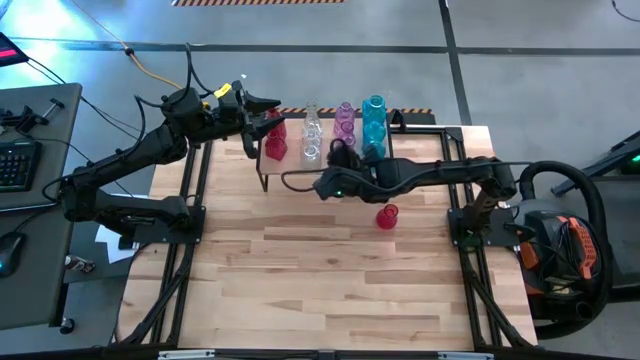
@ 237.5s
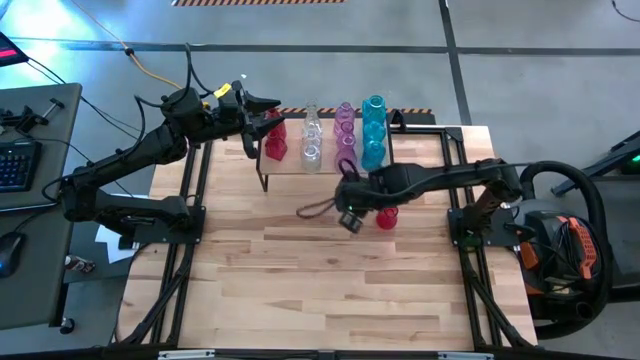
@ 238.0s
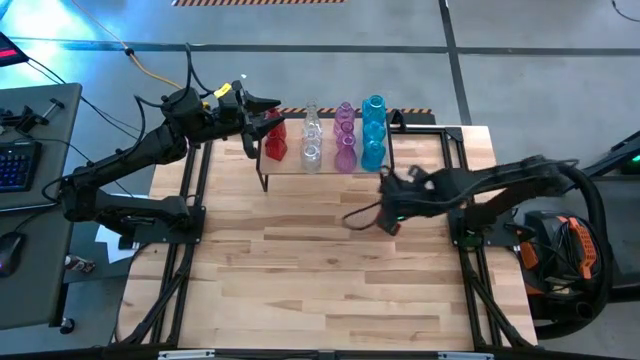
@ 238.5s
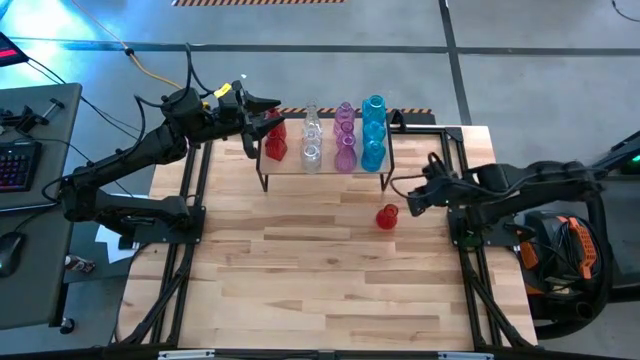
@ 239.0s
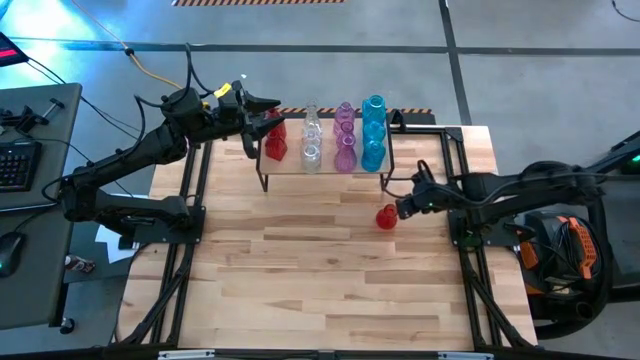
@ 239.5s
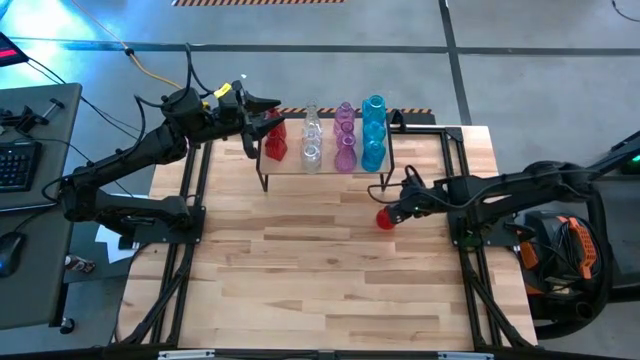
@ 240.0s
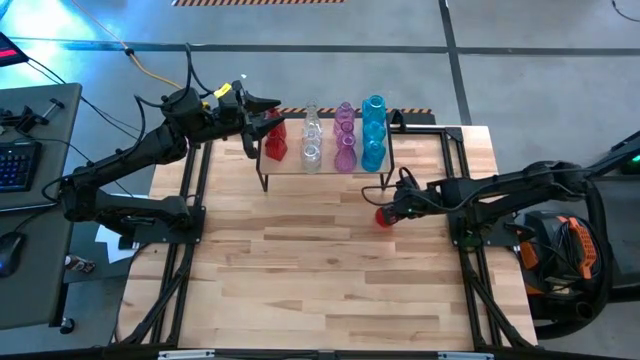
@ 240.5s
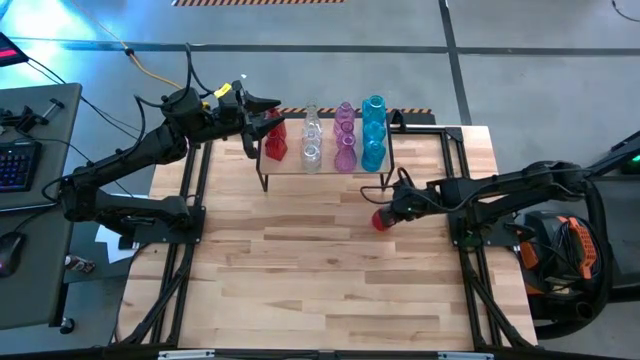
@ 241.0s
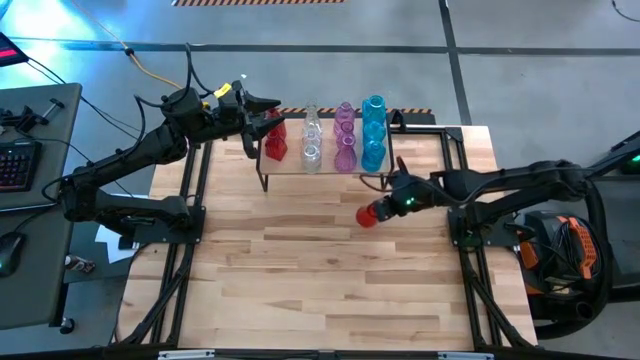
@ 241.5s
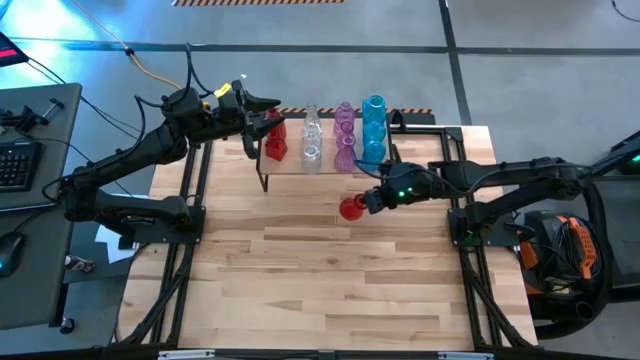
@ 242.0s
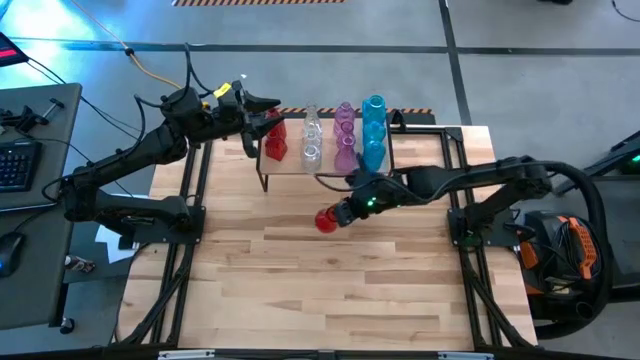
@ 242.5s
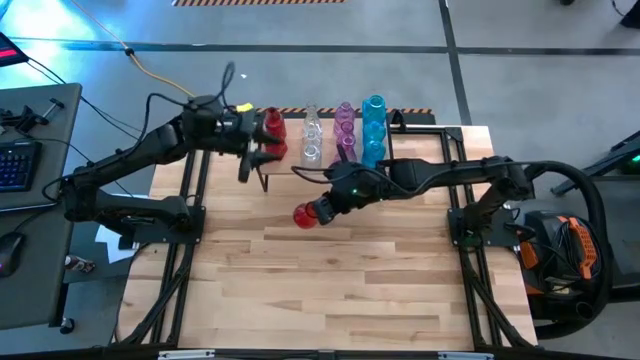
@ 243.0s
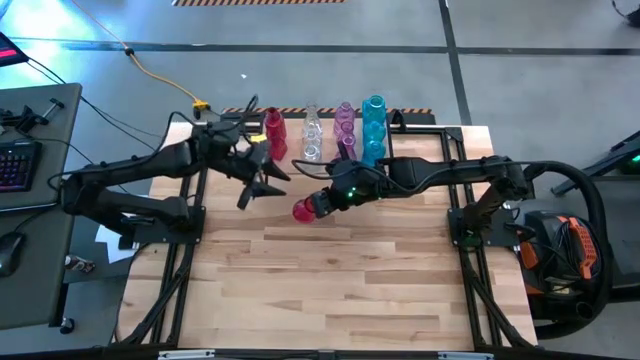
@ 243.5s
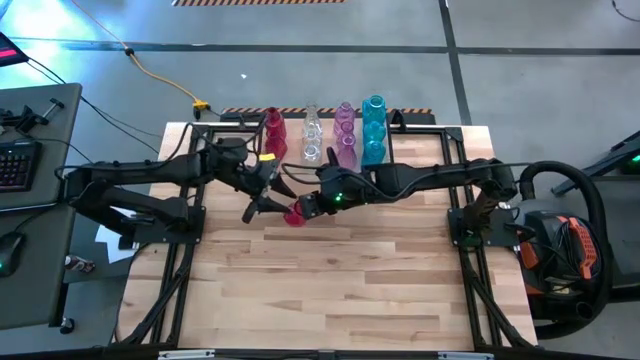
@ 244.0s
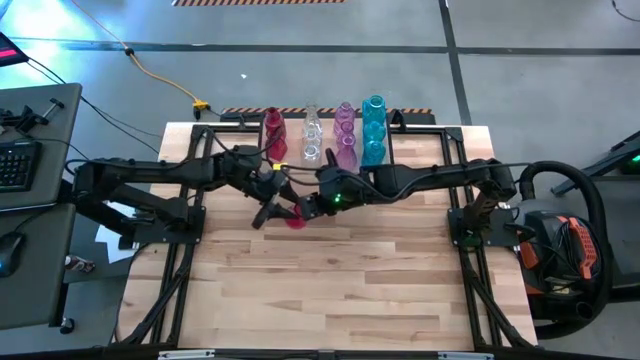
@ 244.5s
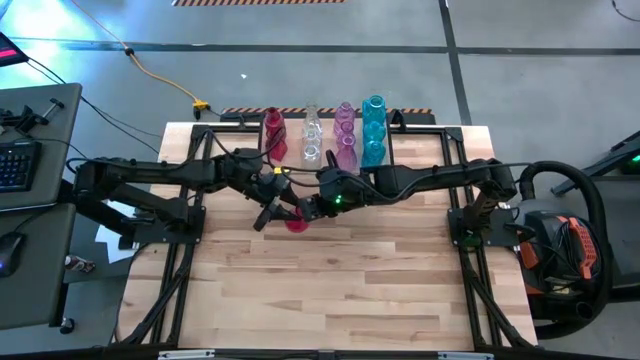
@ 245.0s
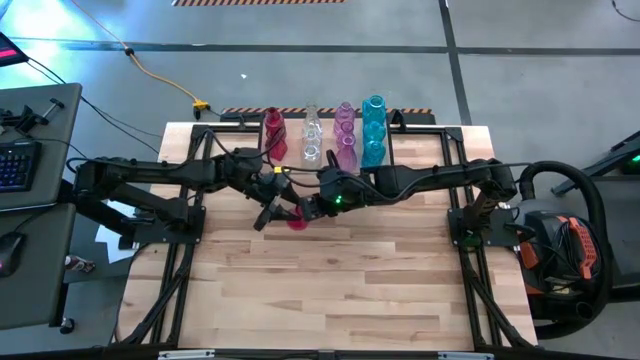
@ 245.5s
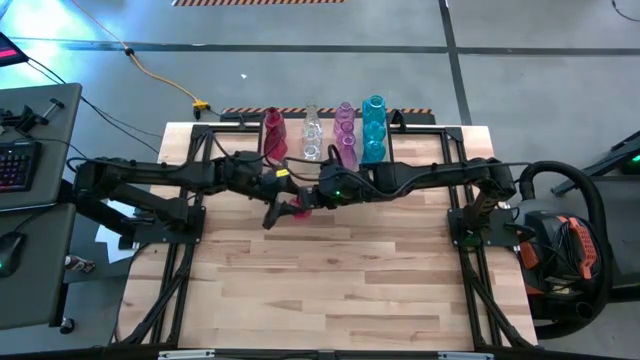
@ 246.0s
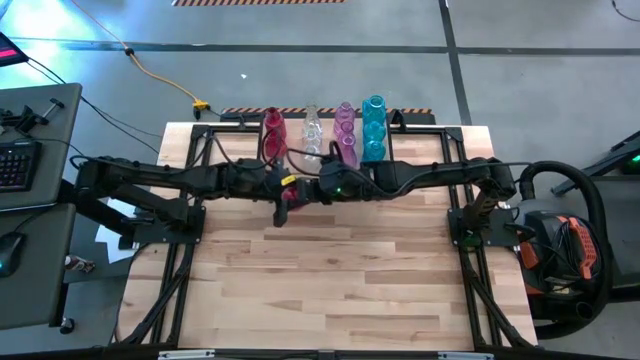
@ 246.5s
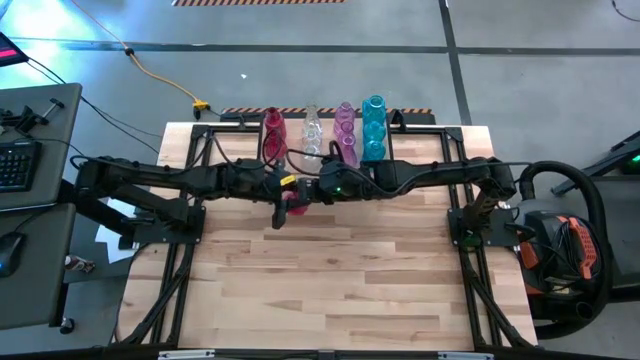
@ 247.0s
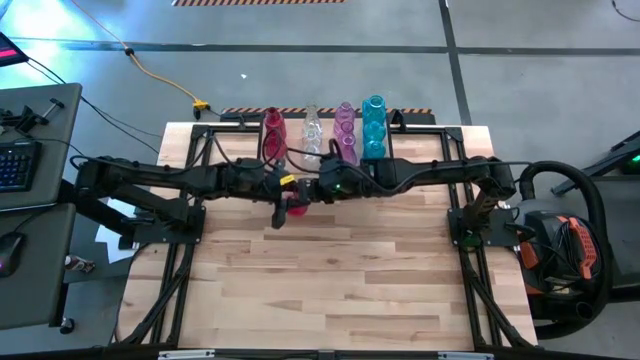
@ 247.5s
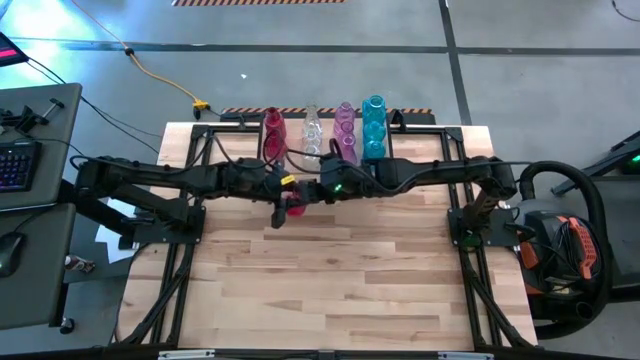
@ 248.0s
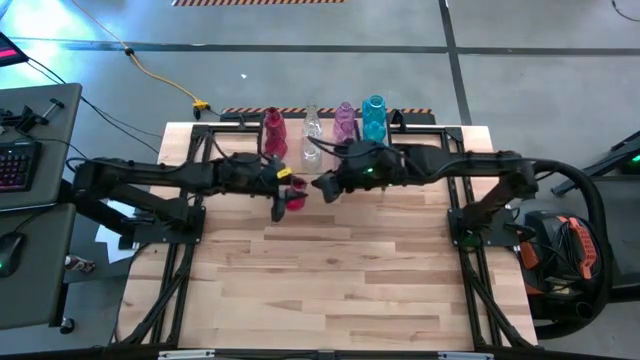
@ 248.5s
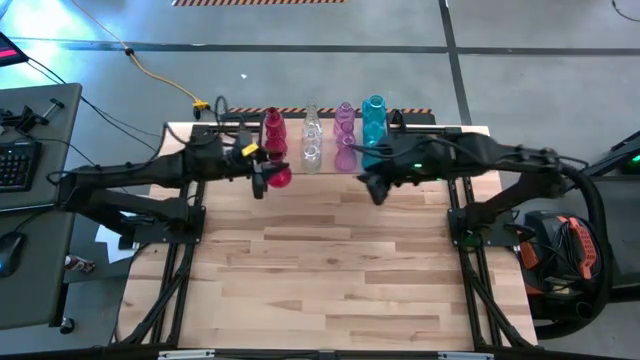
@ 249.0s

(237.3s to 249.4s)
Task: sort vases onto shelf
Put the red vase on the shelf aligned with the other red vases

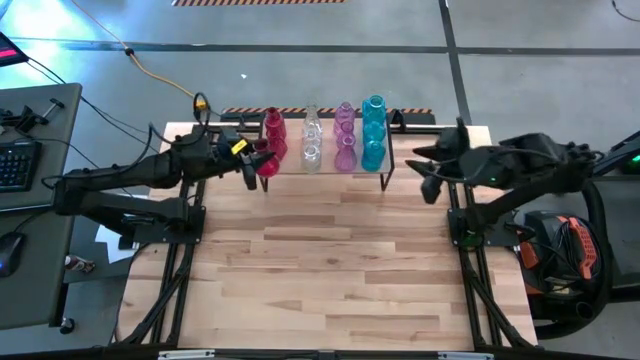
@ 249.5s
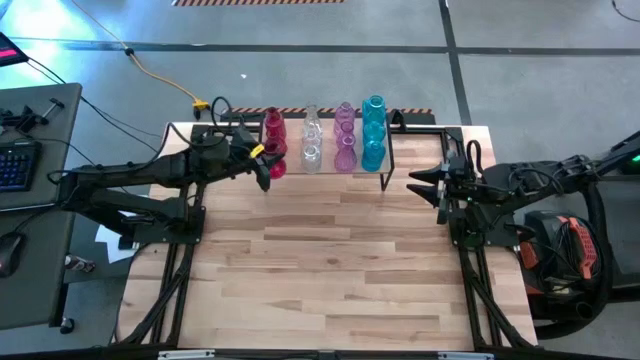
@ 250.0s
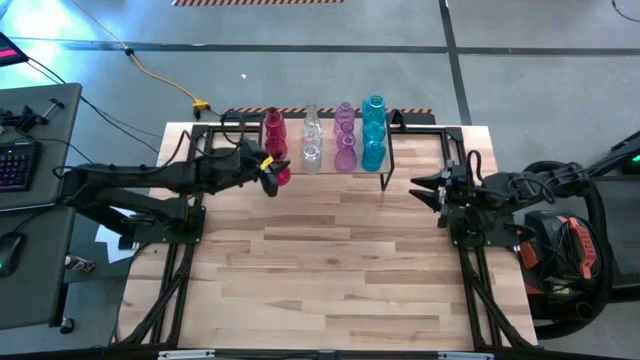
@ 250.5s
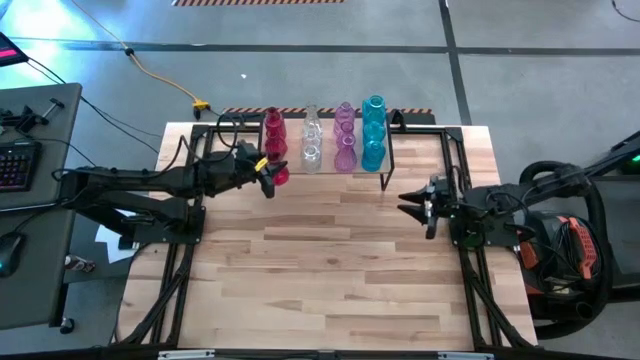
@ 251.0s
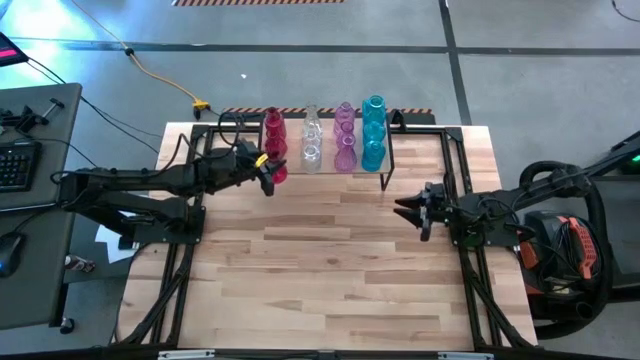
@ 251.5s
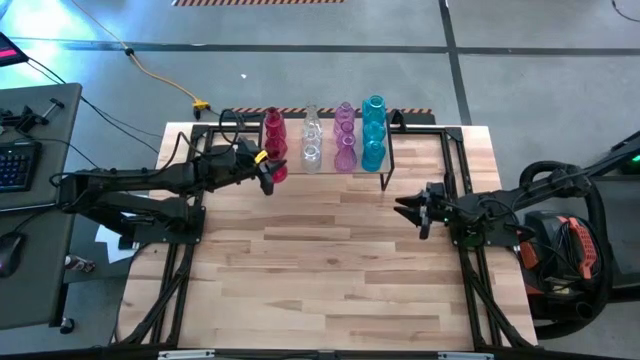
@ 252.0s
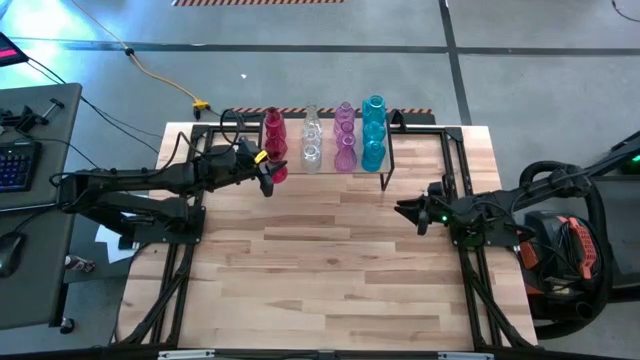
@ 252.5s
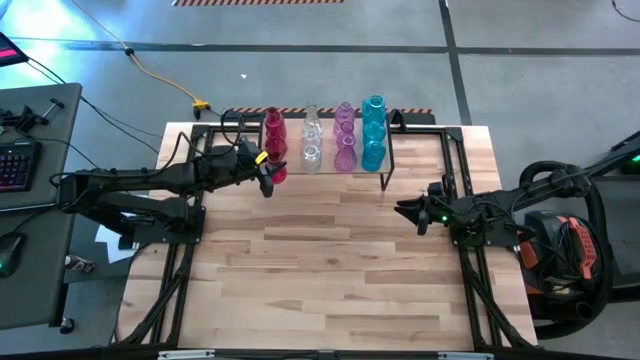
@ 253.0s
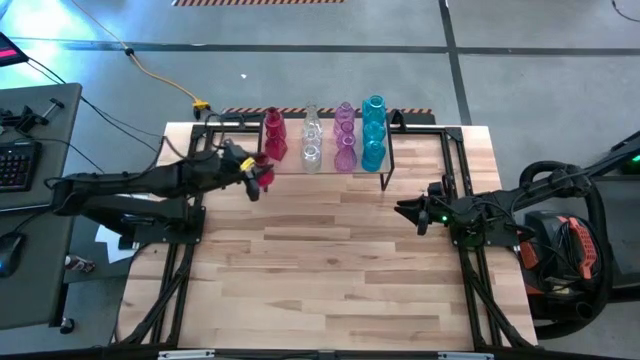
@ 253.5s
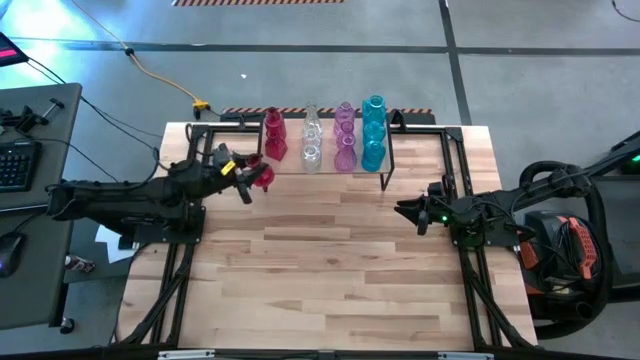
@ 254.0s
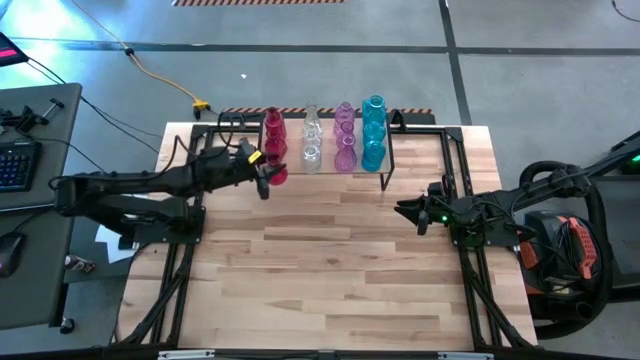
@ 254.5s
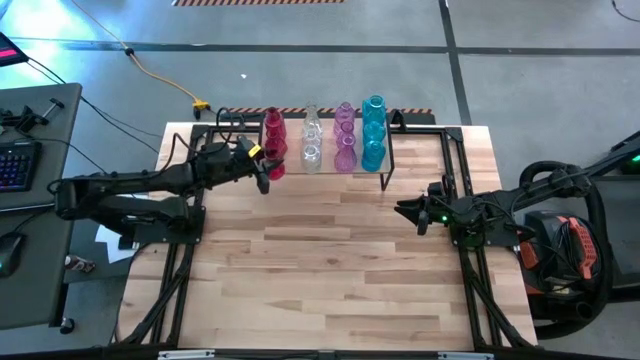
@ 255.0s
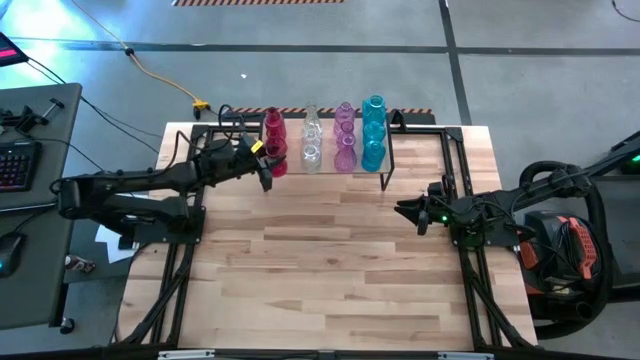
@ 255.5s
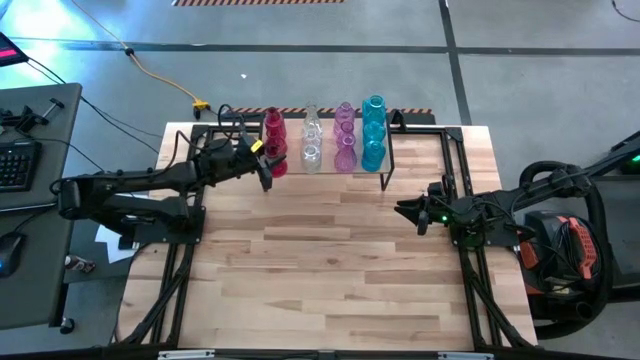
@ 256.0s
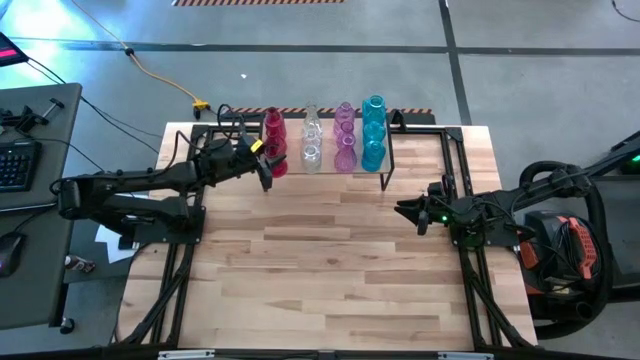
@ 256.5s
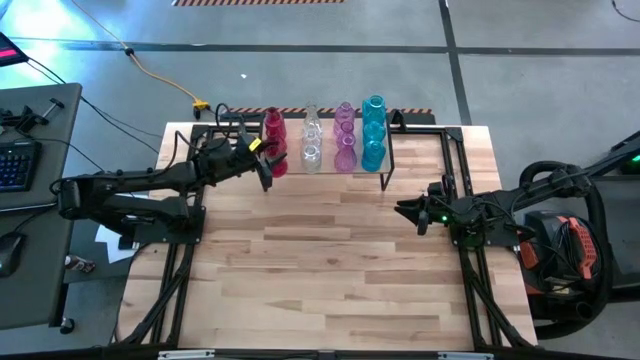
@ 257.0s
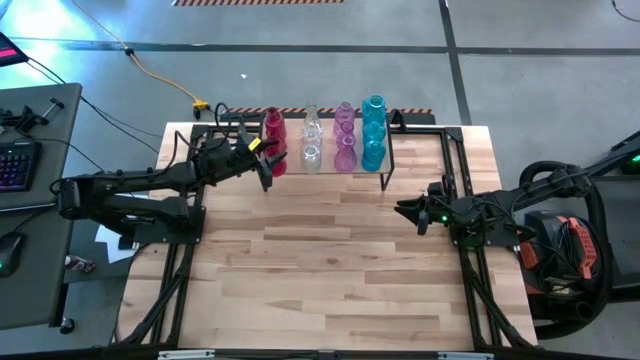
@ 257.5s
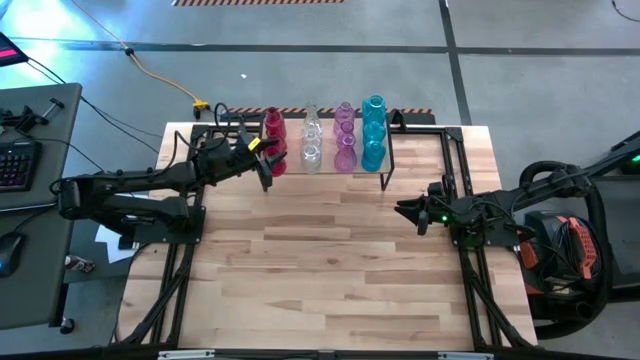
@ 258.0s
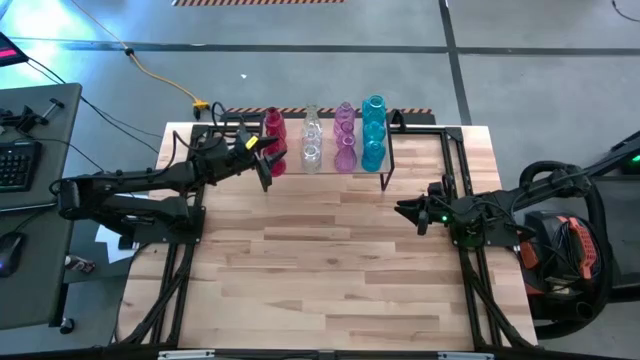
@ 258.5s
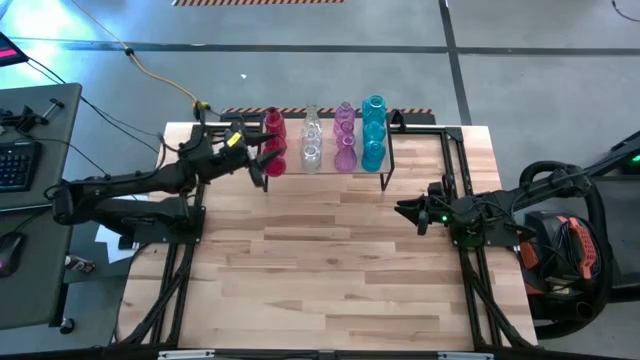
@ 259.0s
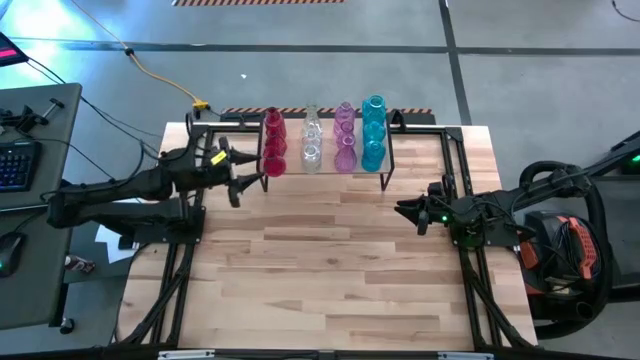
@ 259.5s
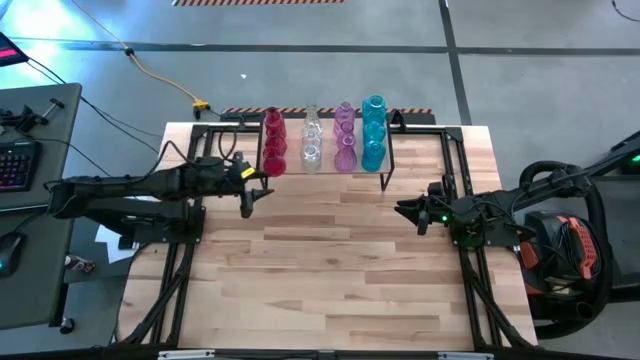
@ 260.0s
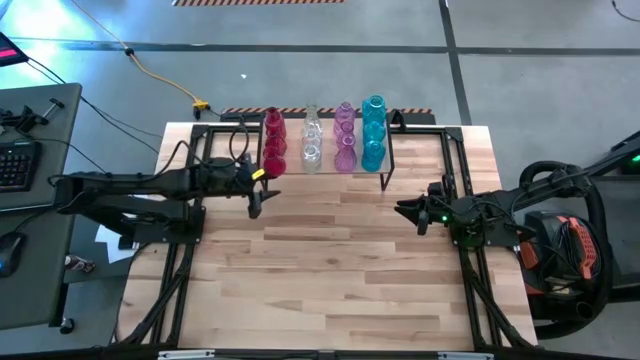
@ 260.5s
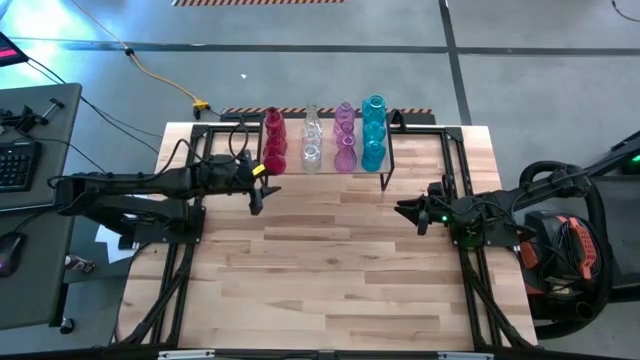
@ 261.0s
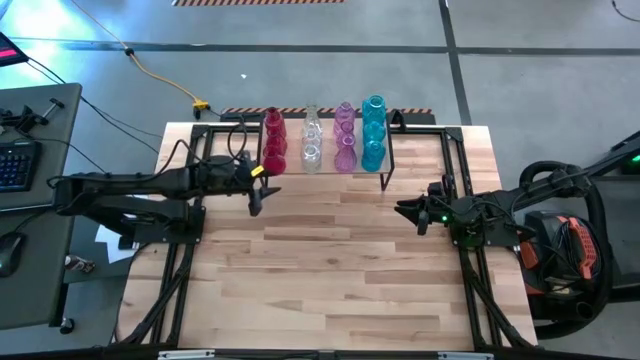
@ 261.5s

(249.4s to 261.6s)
Put the red vase on the shelf aligned with the other red vases
